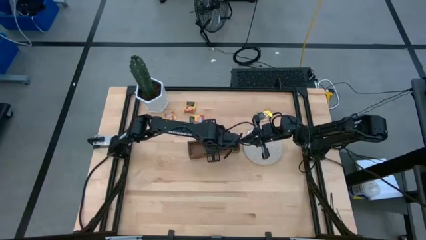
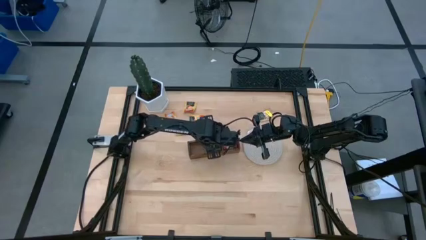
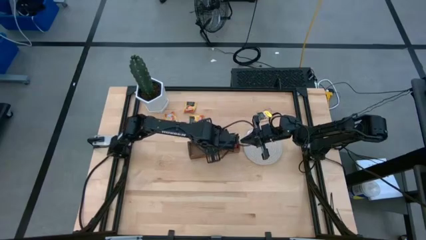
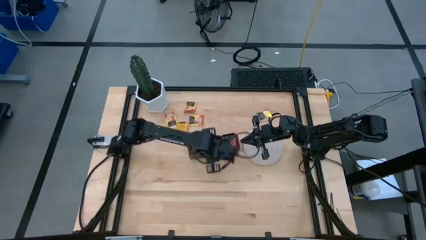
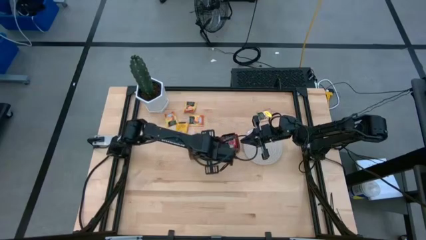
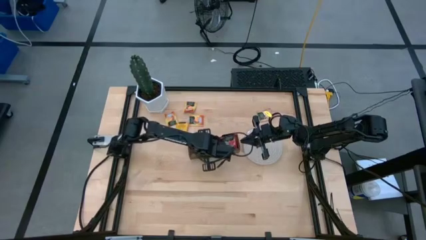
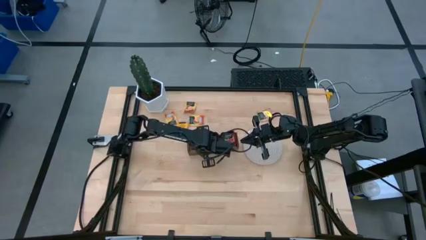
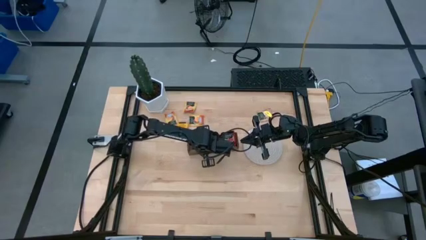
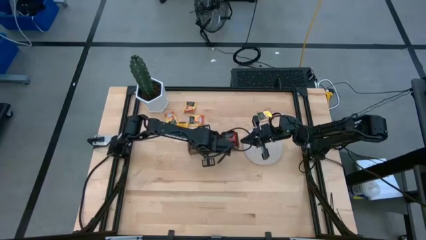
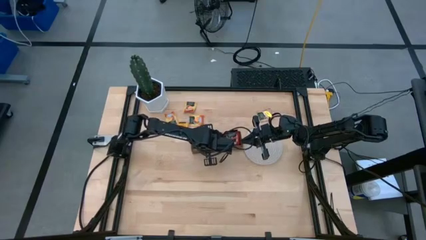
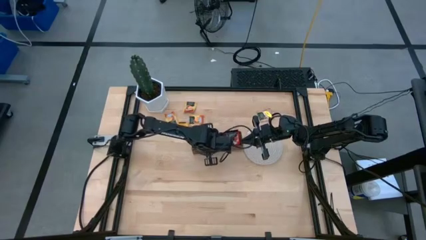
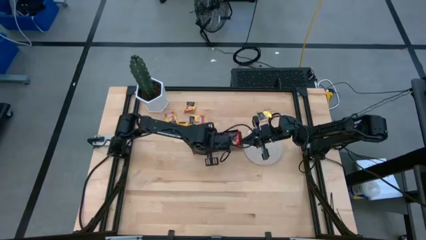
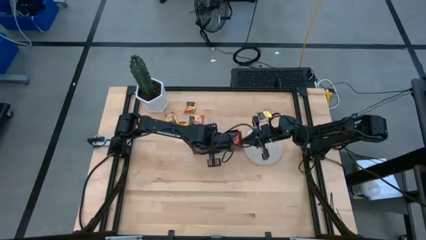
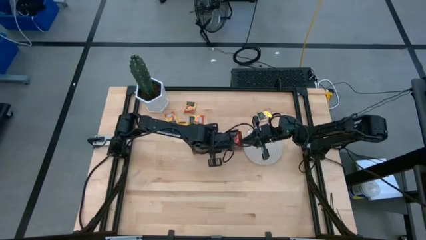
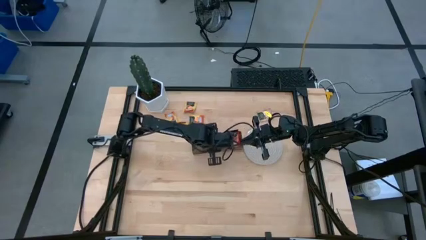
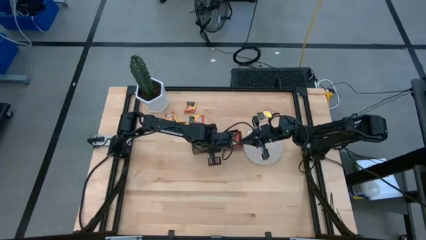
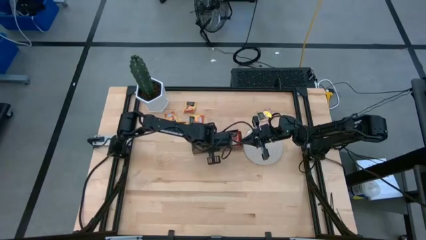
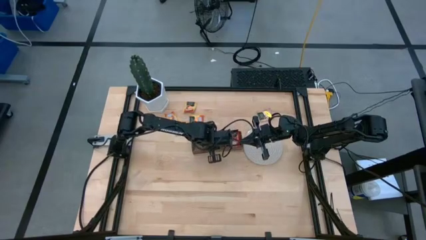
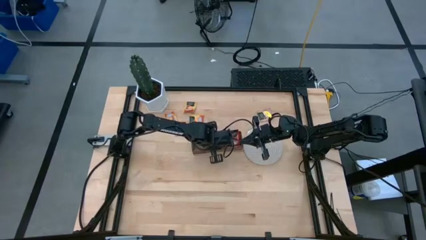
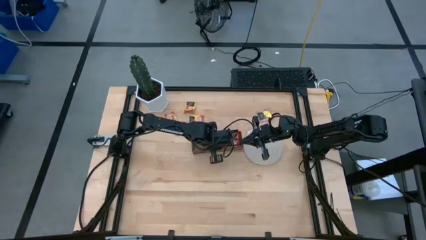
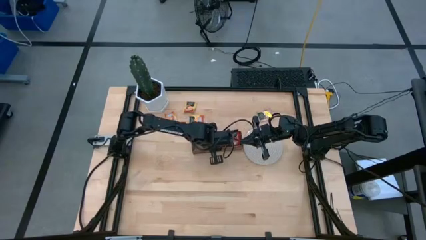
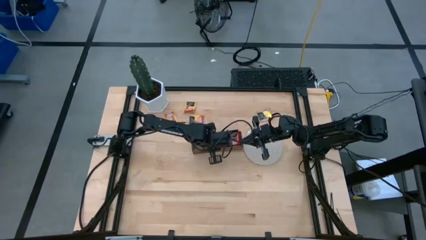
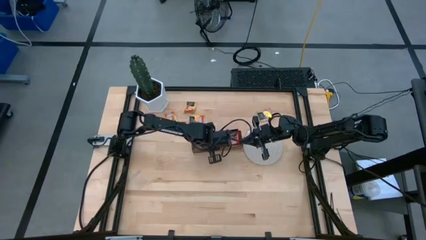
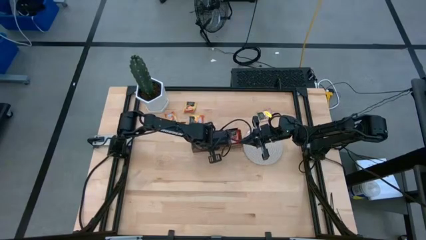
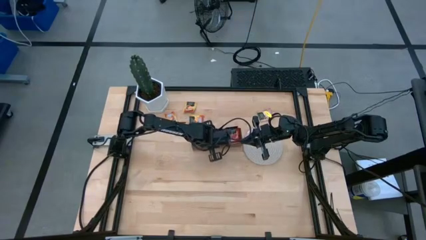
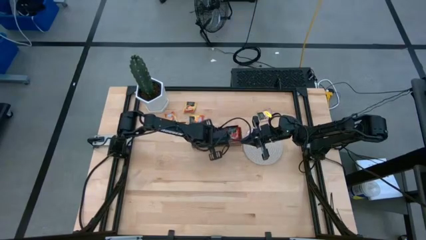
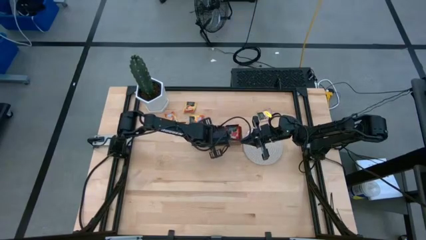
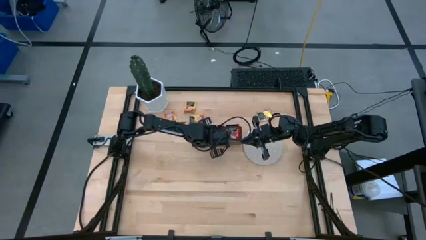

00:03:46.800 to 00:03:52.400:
Task: Pick & Place Tea
Adjust the wooden organizer

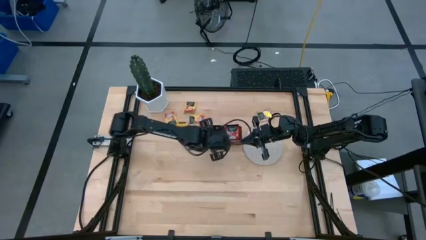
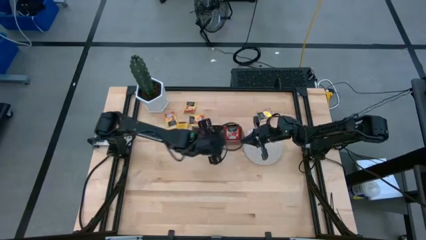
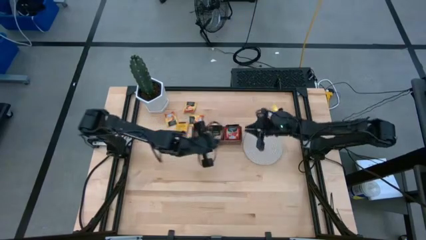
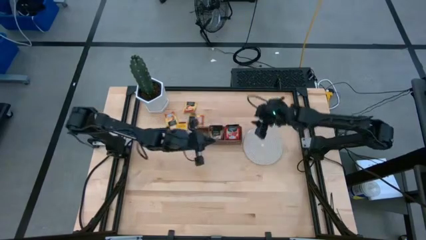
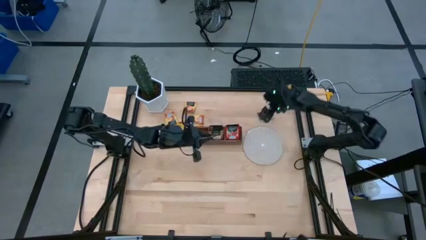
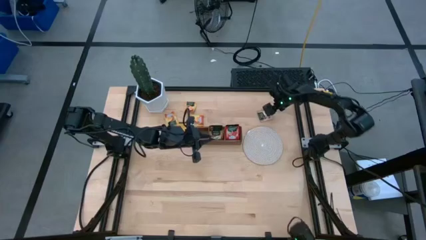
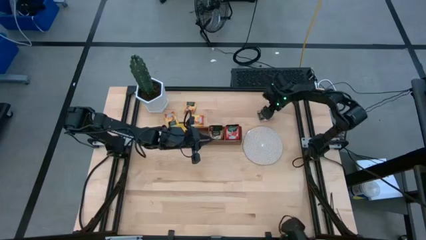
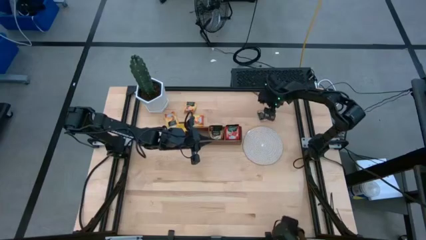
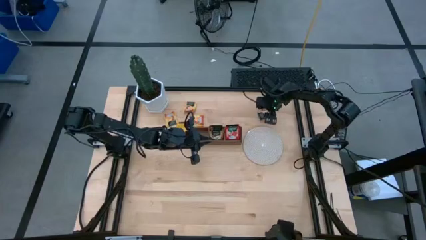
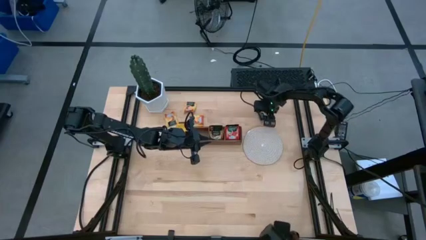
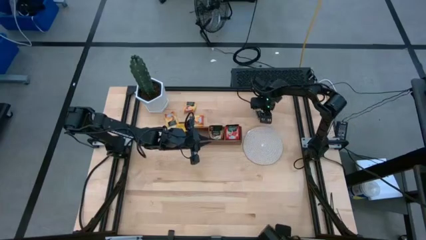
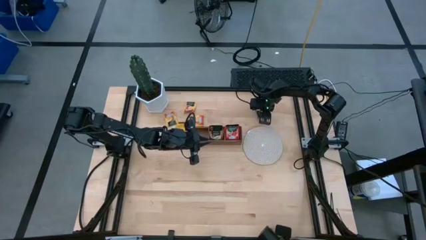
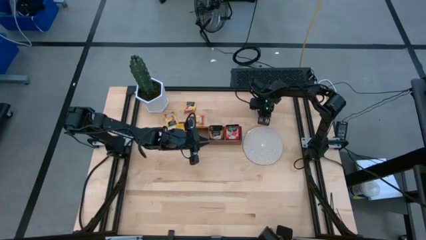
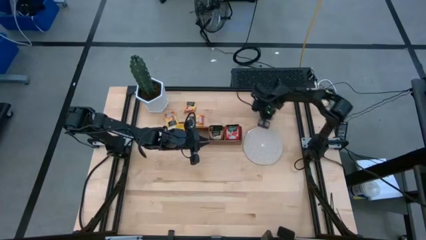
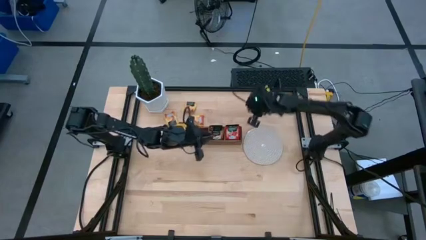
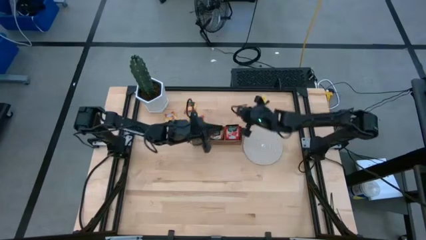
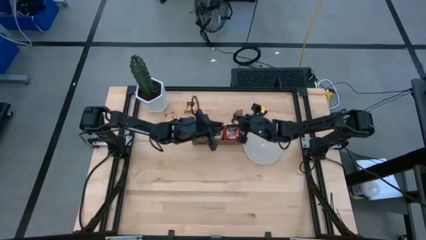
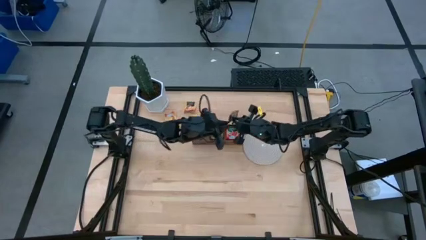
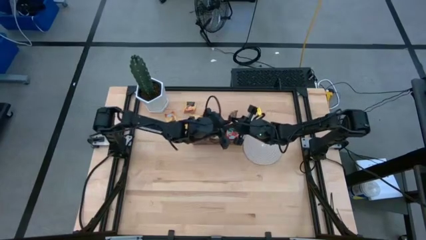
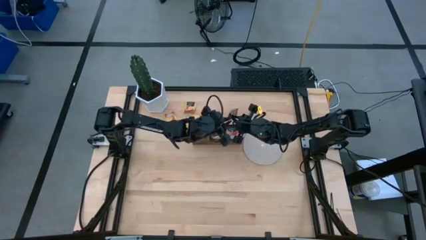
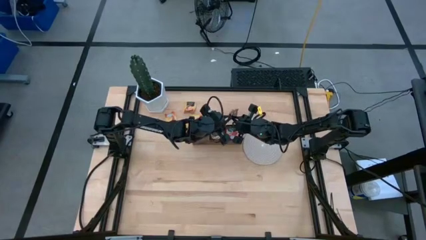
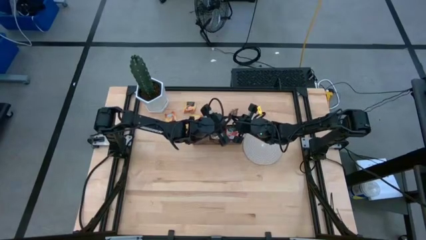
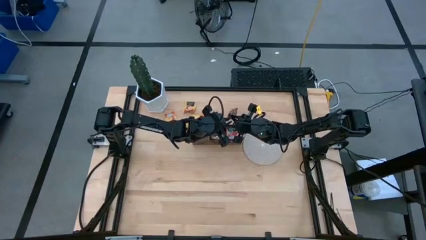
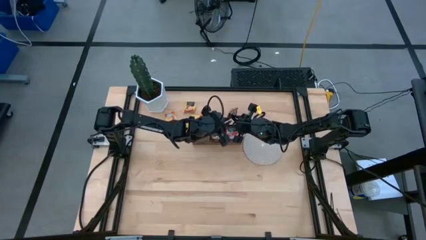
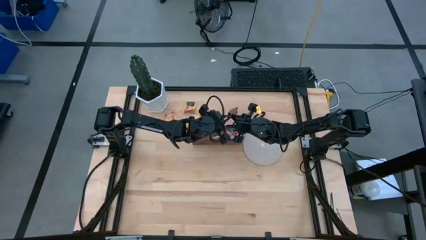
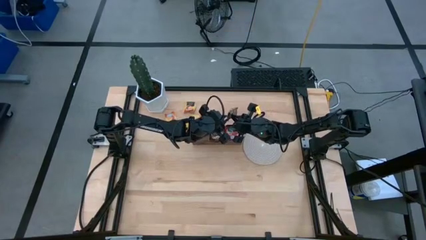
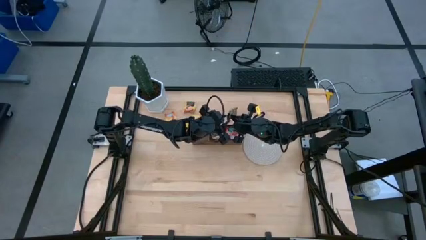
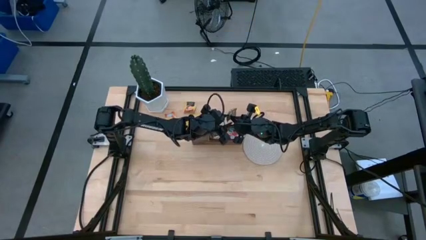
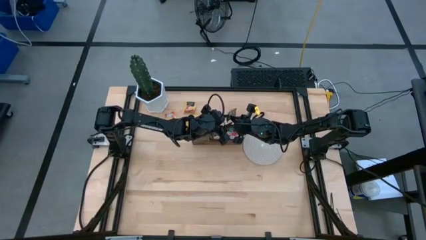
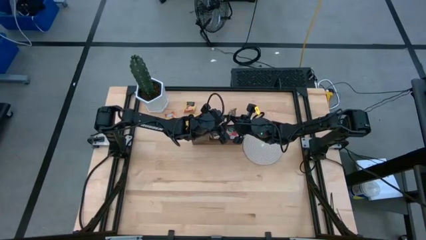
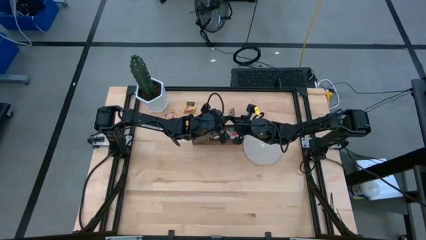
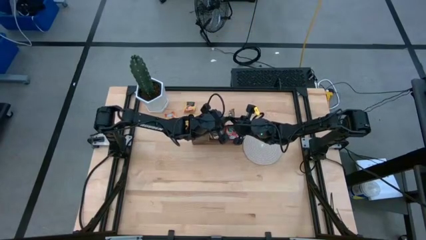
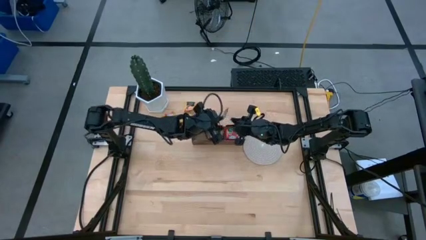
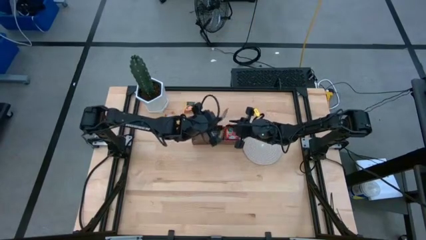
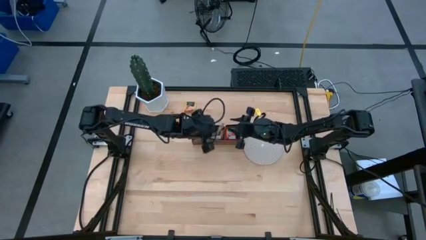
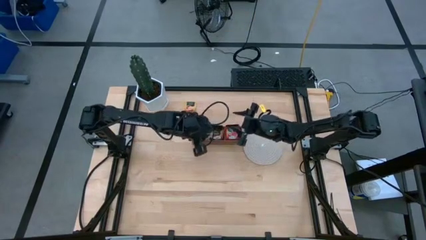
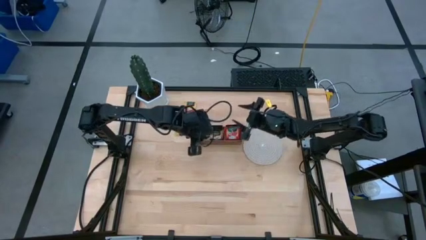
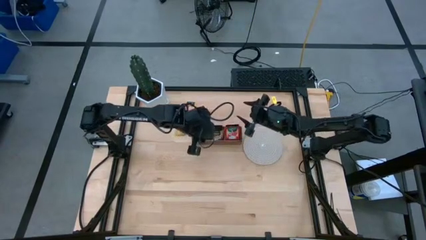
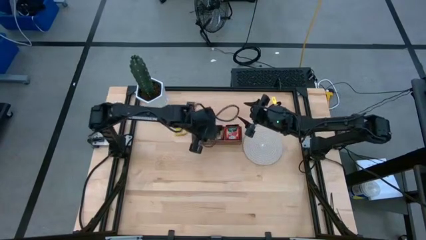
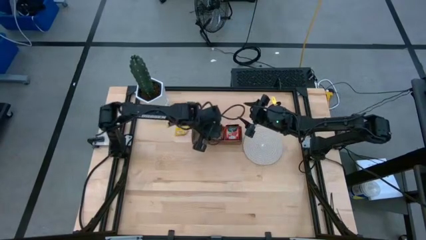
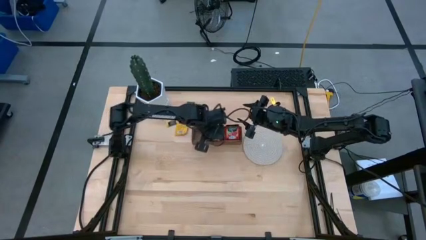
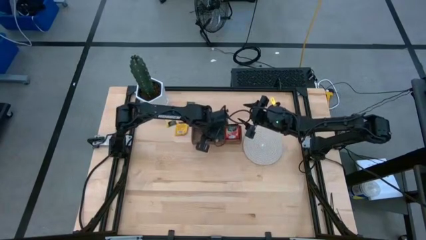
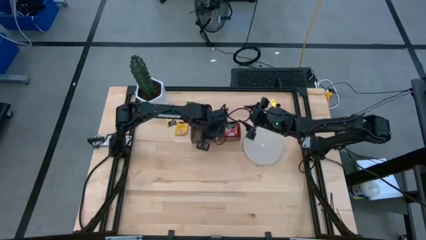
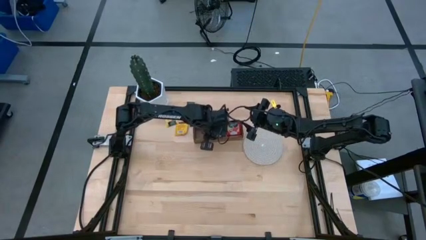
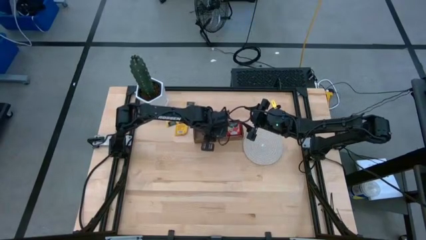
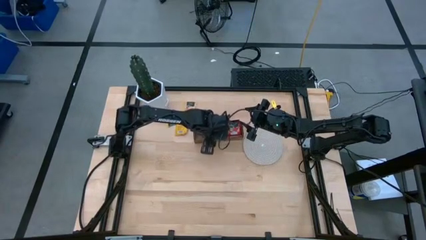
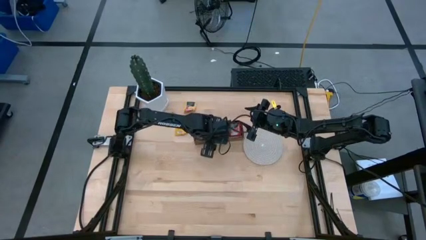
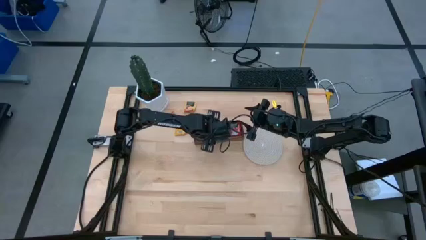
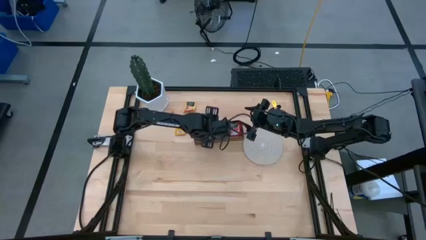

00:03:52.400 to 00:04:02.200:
Put the brown tea bag into the middle section of the wooden organizer

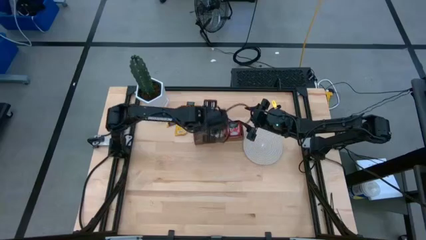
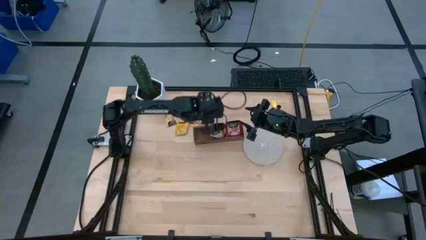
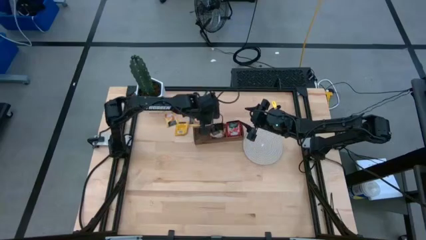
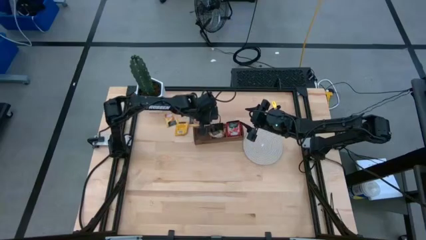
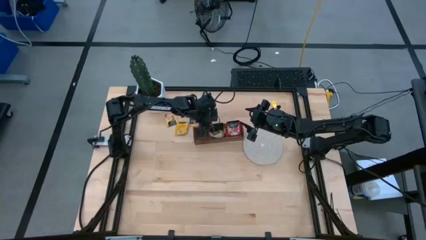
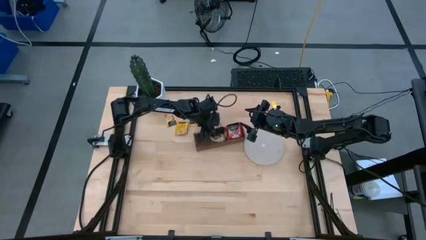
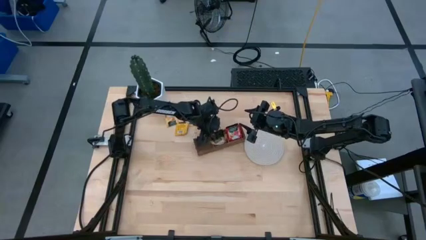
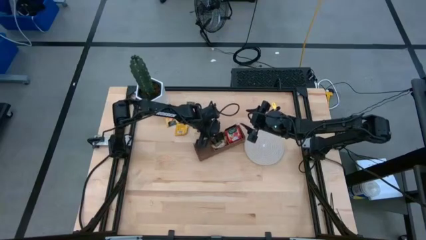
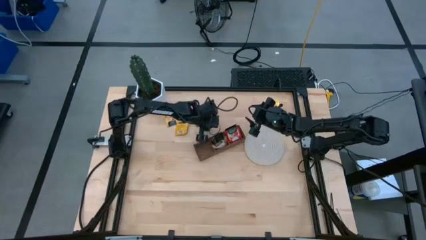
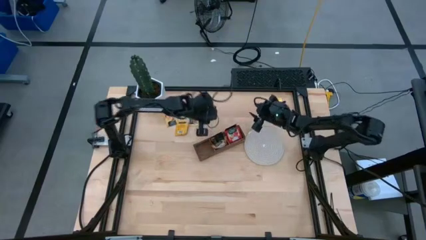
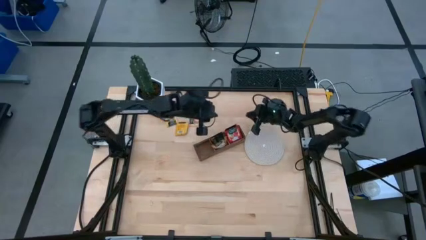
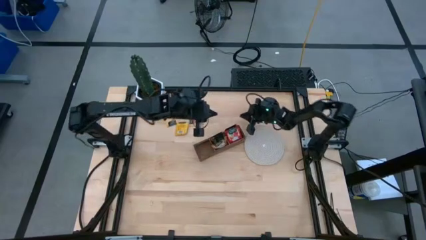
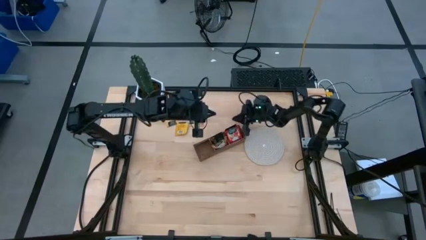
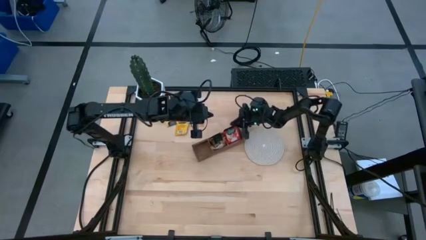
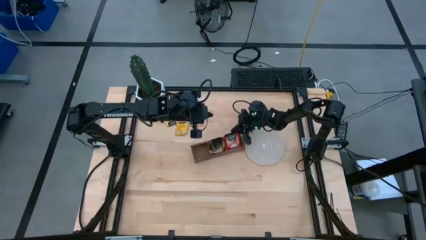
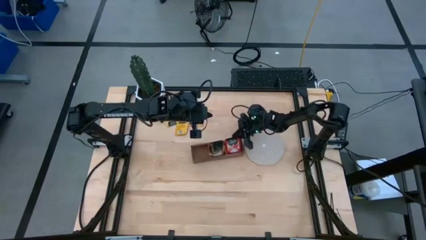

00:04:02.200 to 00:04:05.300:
Adjust the wooden organizer
